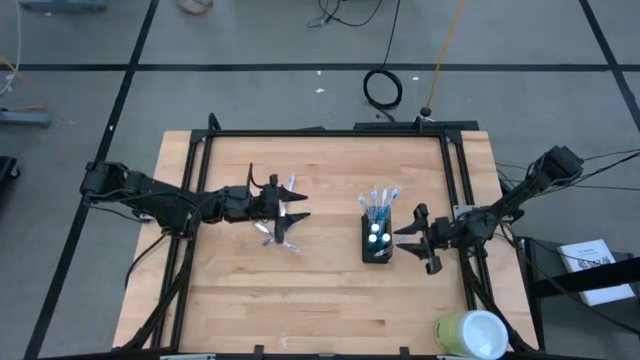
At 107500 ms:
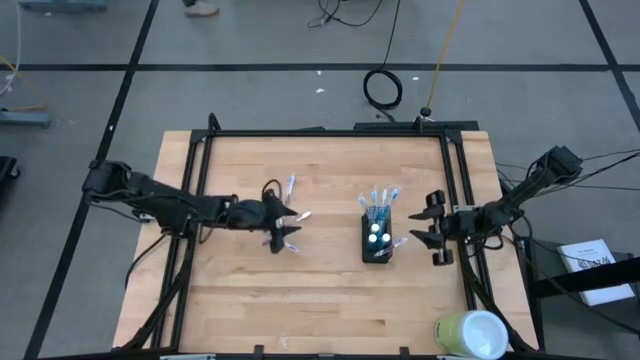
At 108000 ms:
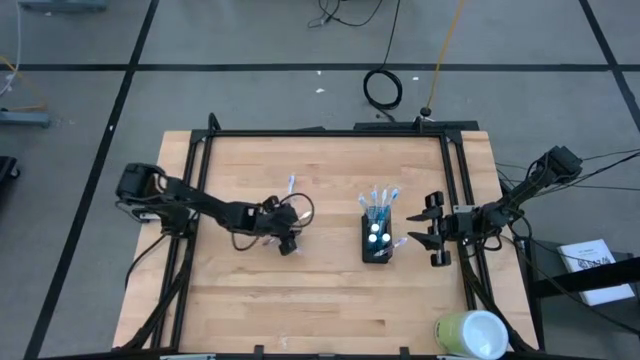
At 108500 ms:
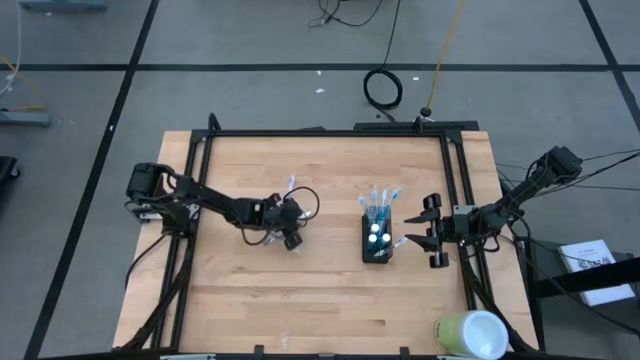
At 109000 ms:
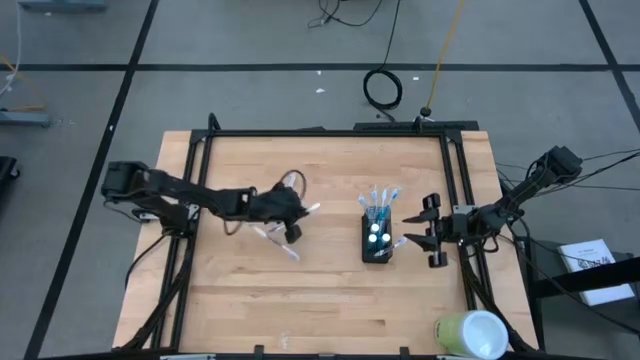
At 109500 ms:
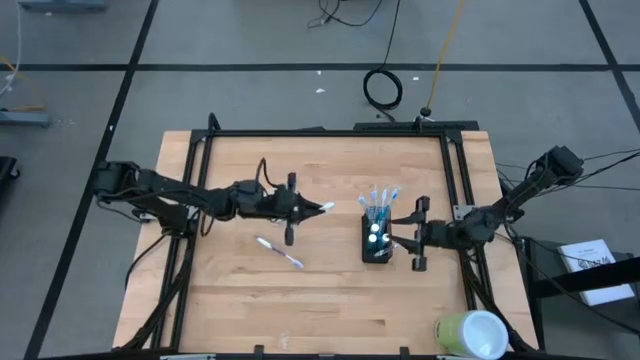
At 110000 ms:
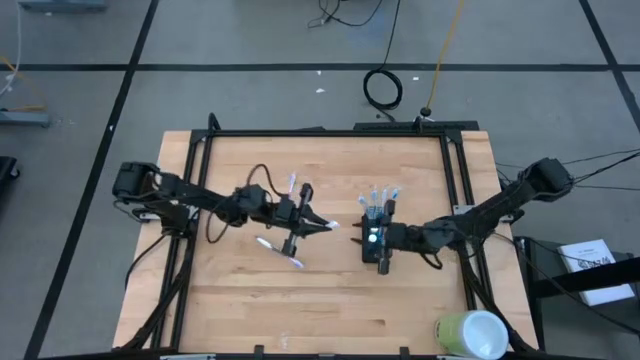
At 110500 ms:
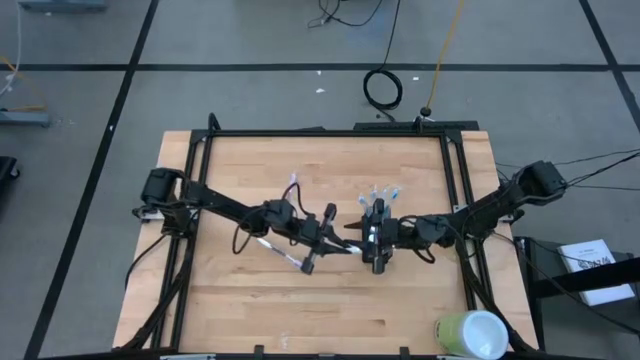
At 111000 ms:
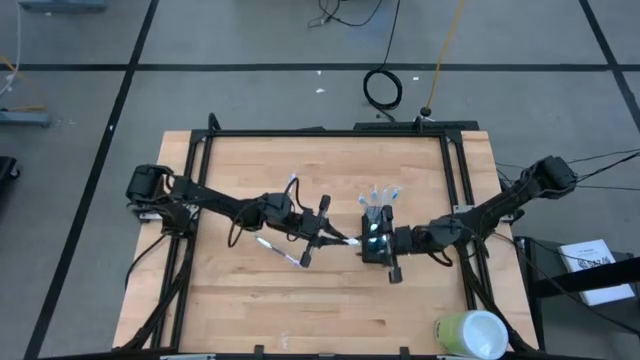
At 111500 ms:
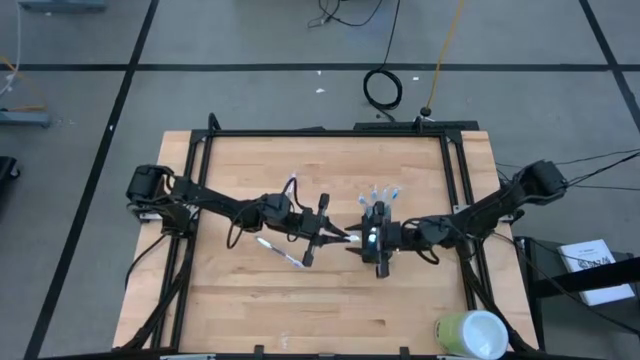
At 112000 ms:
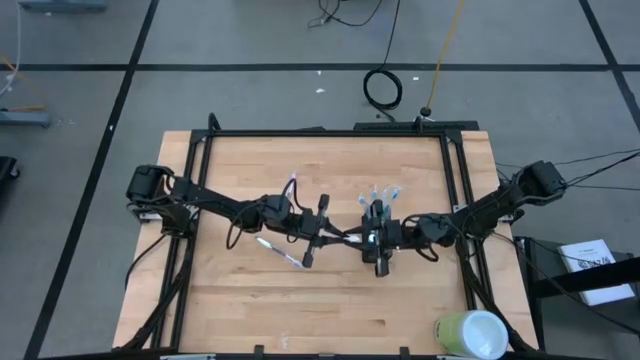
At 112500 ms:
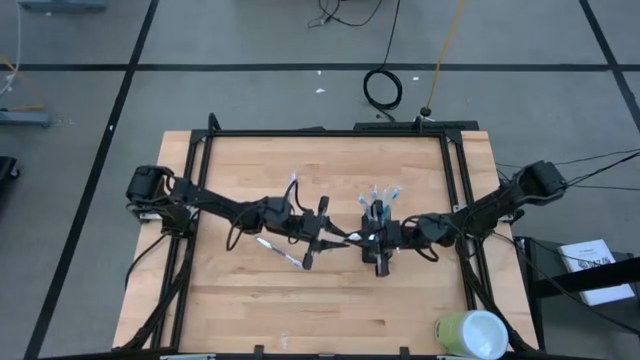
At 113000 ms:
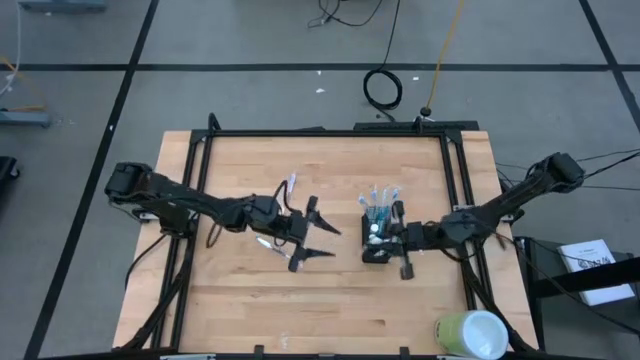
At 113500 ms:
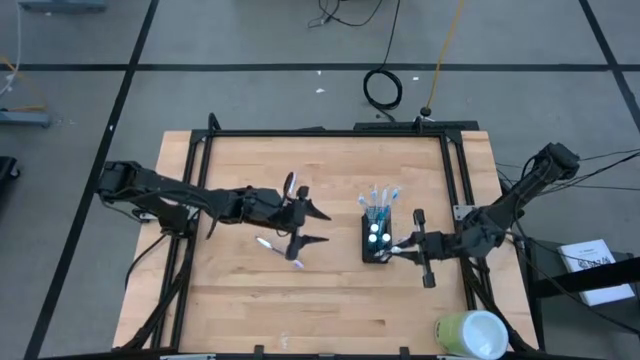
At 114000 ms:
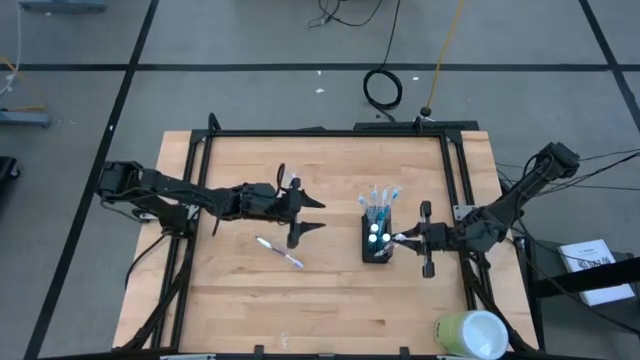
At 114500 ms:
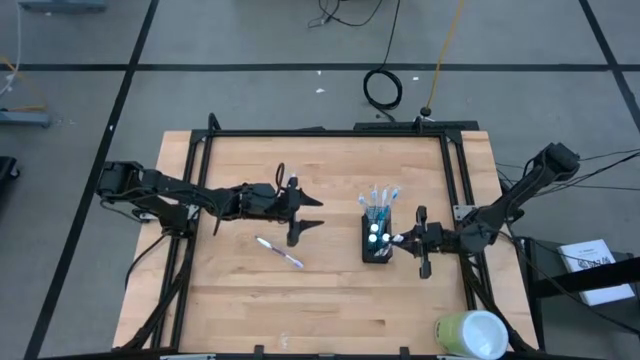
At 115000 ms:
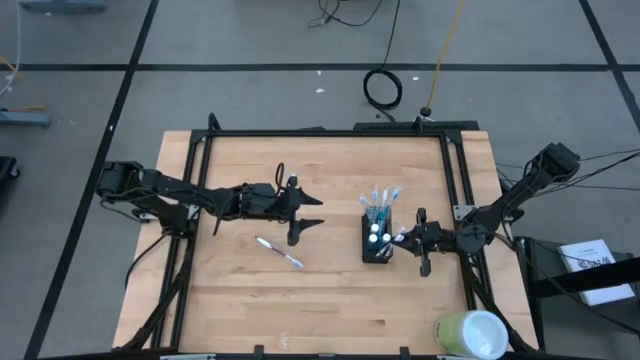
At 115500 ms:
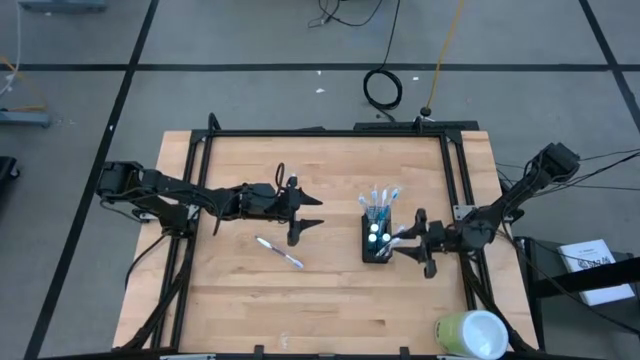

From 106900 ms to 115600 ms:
Task: Pick & Place toothbrushing station
Put the purple toothbrush into the black organizer

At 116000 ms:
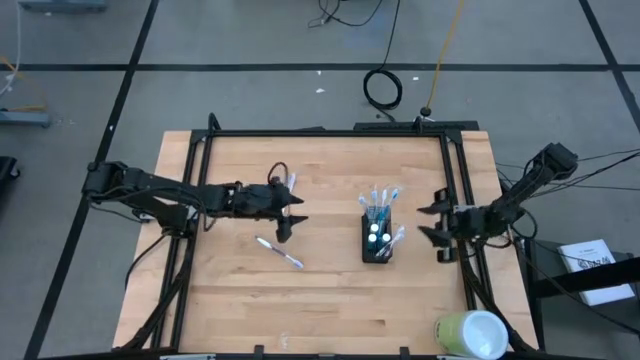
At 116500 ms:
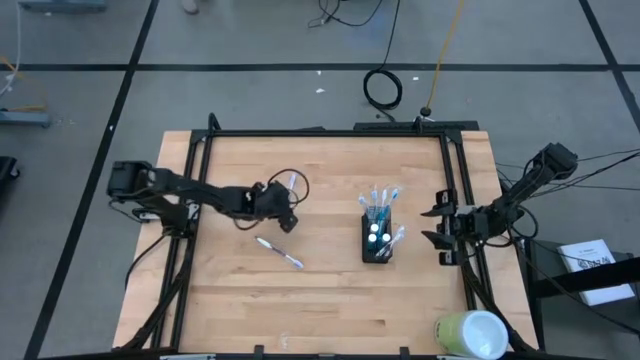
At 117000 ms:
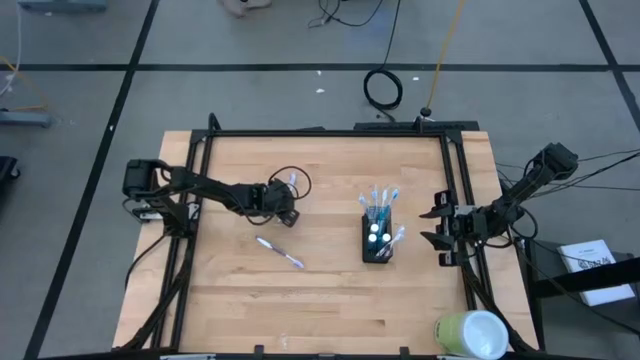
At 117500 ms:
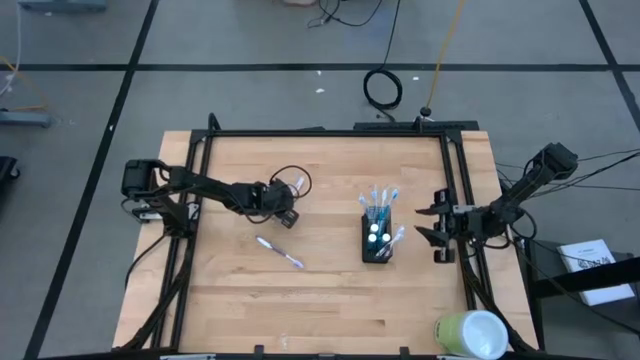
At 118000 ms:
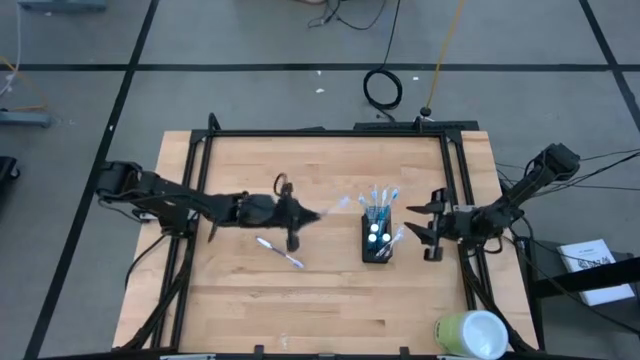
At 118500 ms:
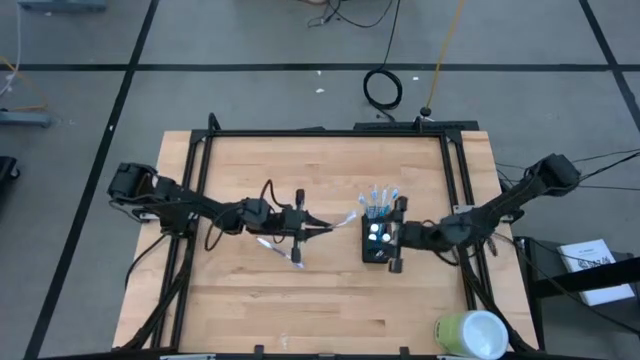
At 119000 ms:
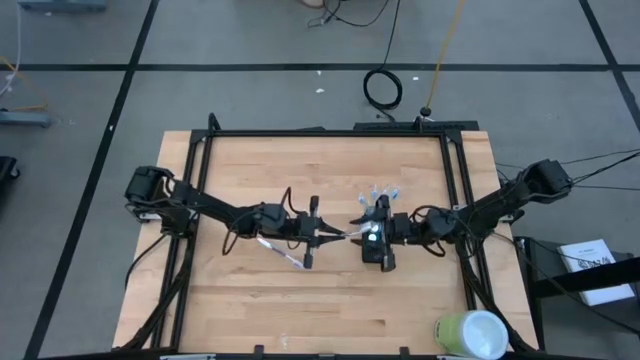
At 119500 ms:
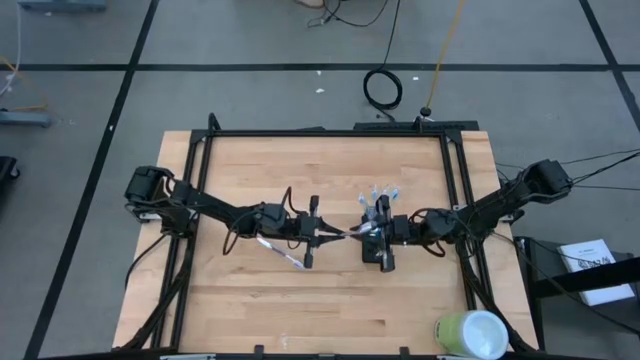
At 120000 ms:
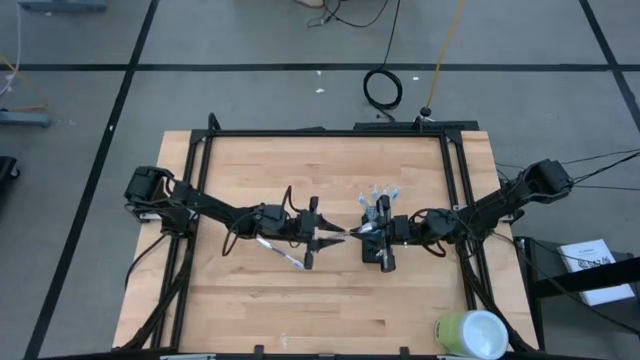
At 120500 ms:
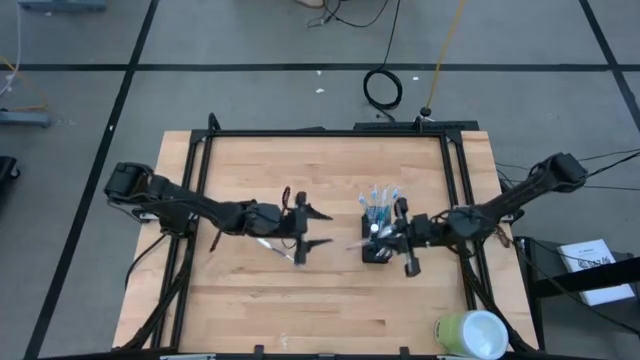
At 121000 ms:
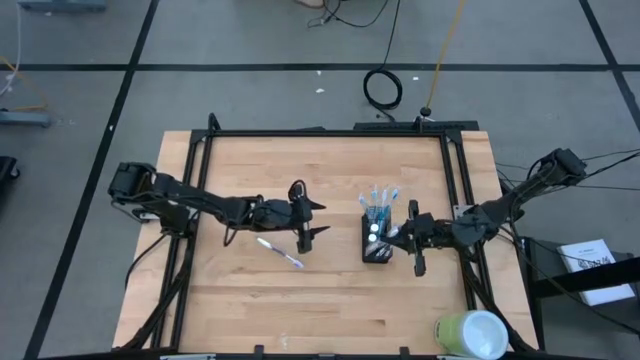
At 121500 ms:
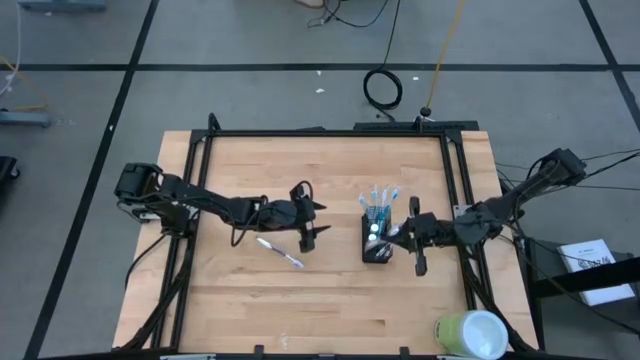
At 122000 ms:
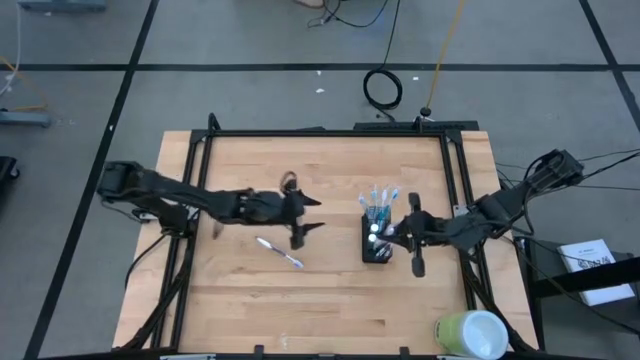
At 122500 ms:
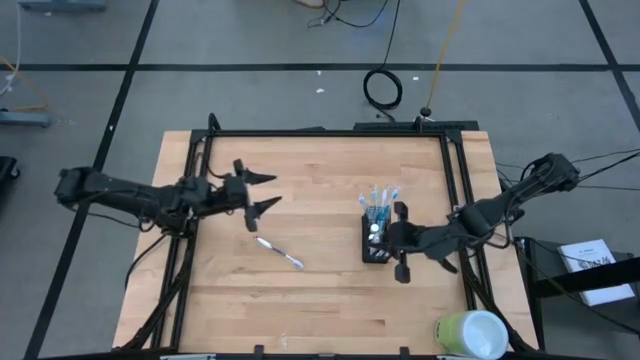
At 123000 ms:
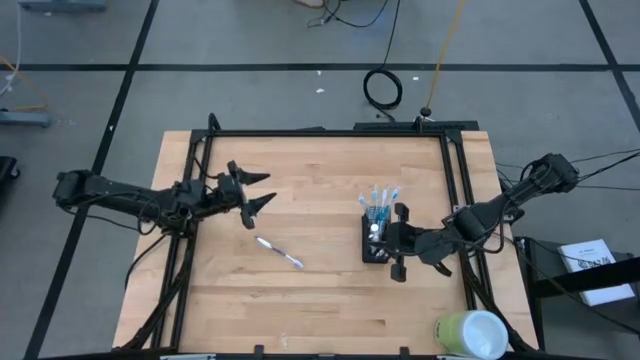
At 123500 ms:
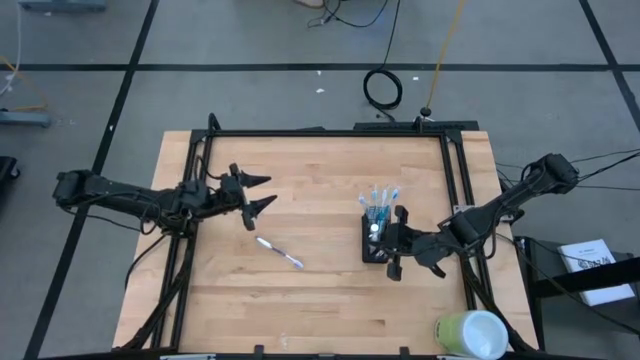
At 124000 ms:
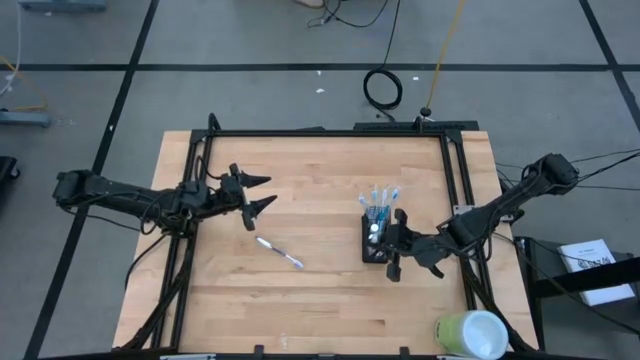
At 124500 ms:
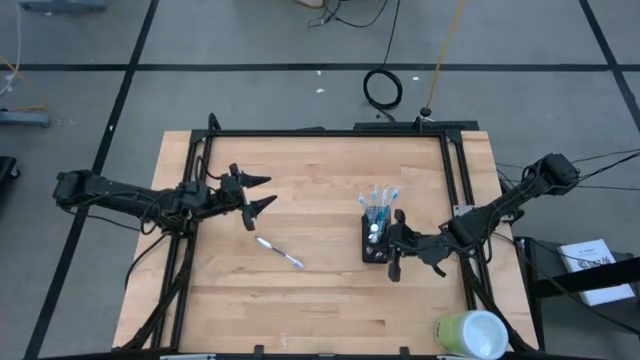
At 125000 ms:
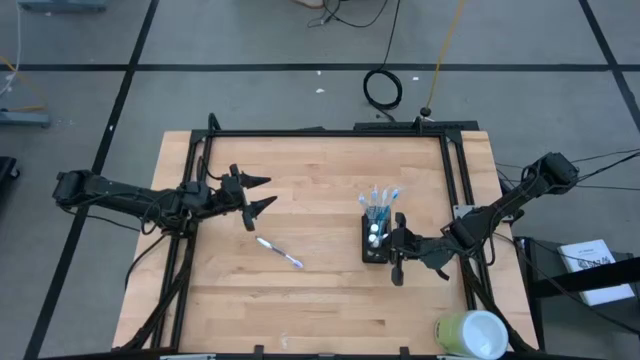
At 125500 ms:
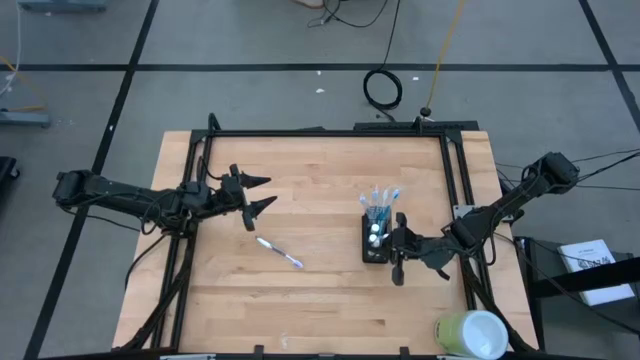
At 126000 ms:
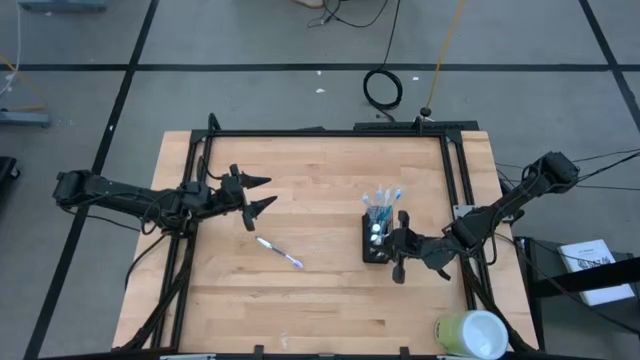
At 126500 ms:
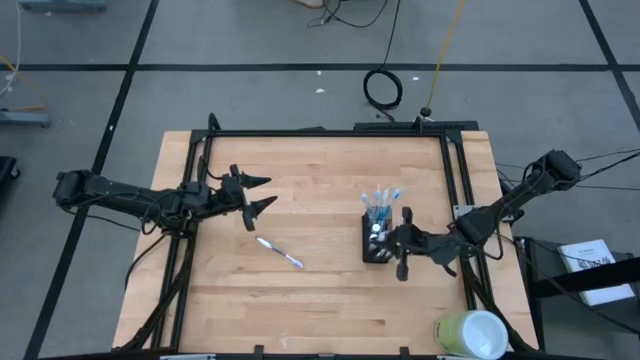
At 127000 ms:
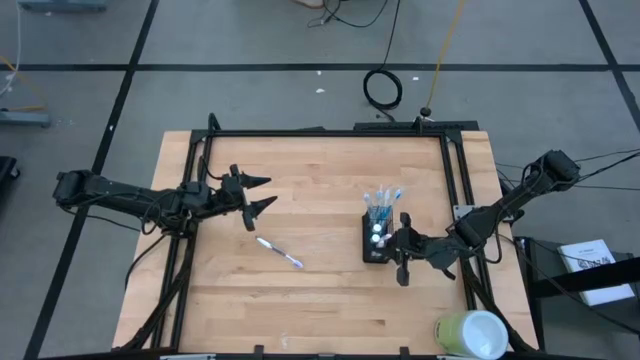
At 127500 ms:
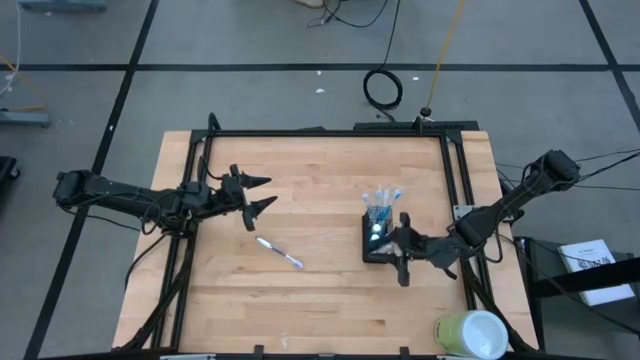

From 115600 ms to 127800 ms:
Put the purple toothbrush into the black organizer
